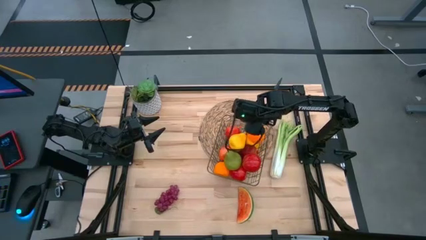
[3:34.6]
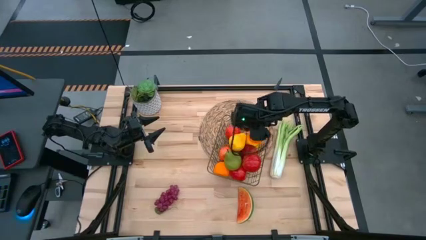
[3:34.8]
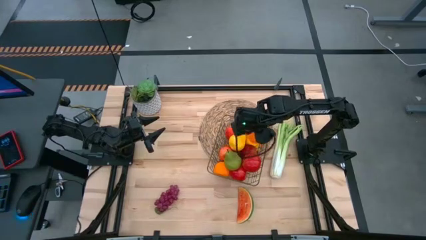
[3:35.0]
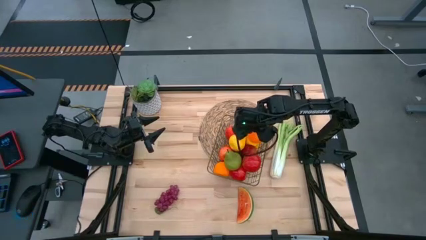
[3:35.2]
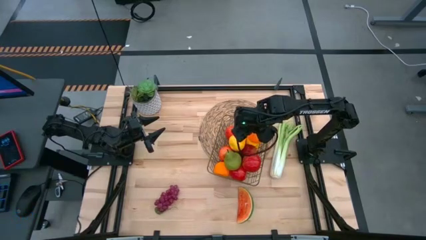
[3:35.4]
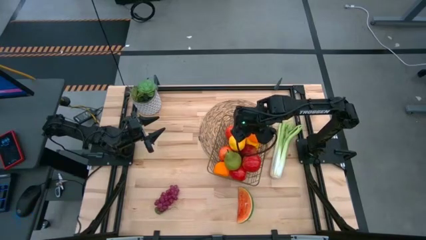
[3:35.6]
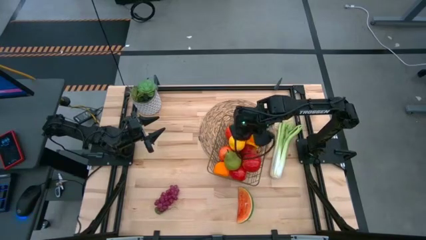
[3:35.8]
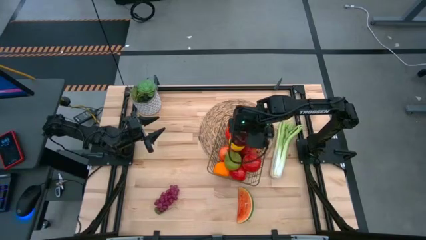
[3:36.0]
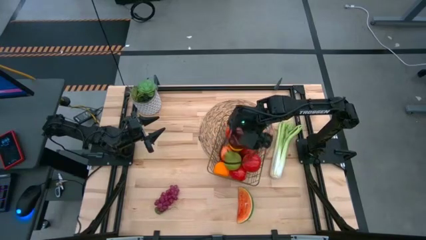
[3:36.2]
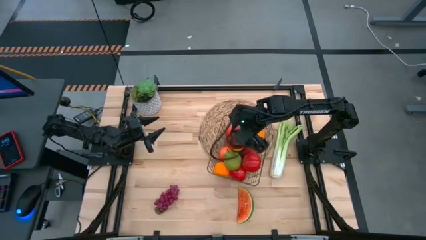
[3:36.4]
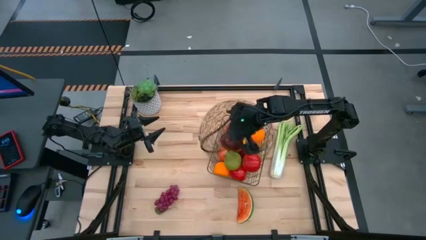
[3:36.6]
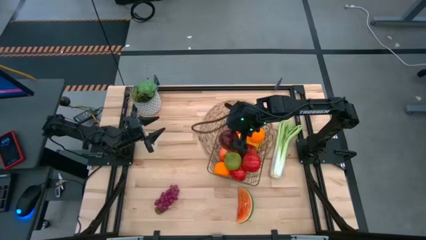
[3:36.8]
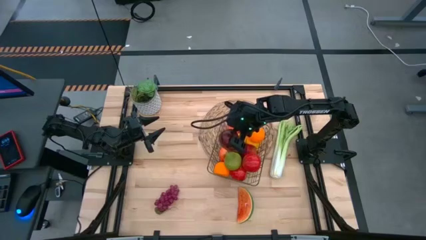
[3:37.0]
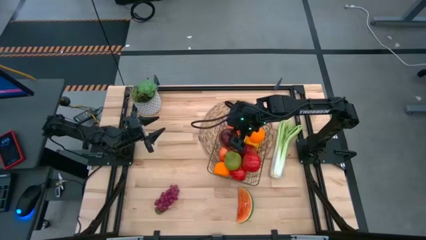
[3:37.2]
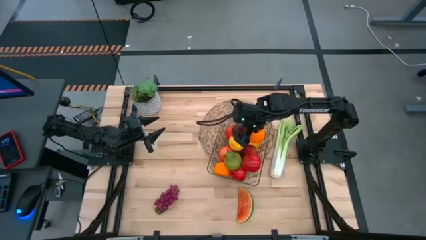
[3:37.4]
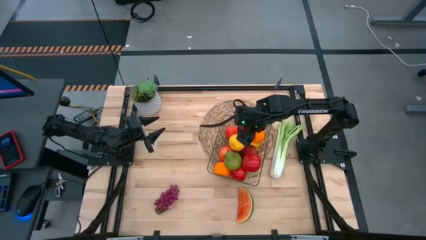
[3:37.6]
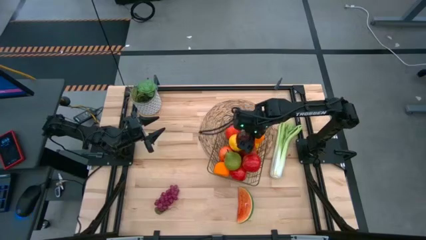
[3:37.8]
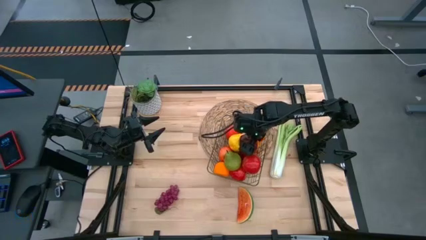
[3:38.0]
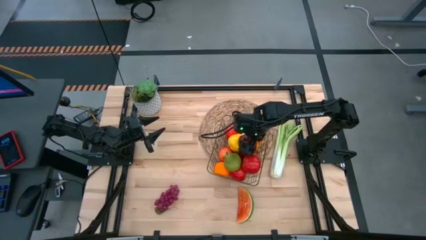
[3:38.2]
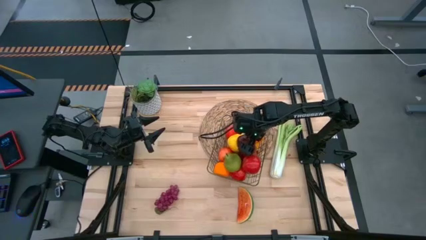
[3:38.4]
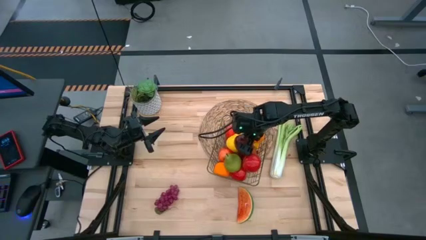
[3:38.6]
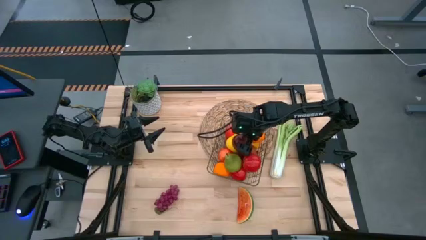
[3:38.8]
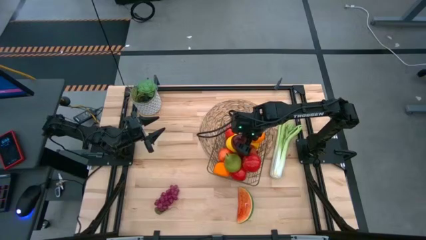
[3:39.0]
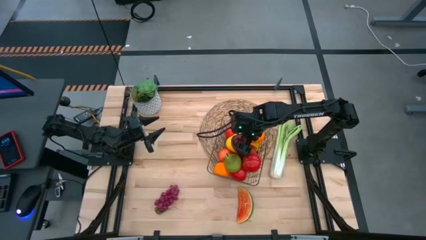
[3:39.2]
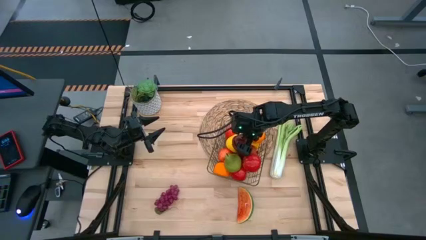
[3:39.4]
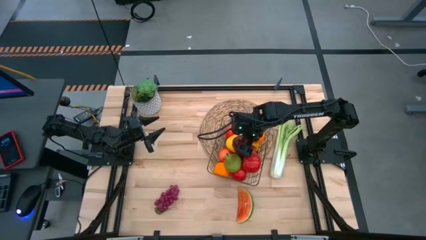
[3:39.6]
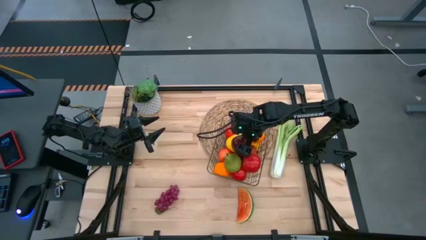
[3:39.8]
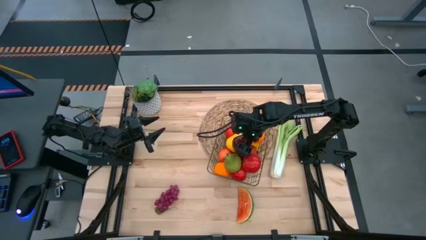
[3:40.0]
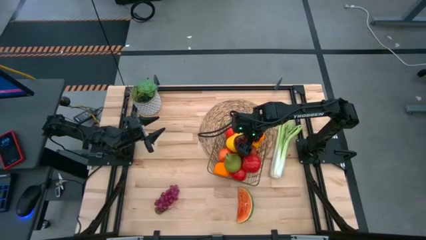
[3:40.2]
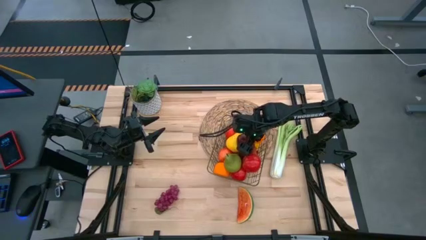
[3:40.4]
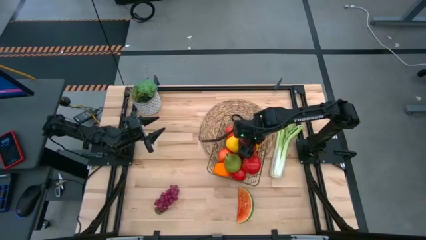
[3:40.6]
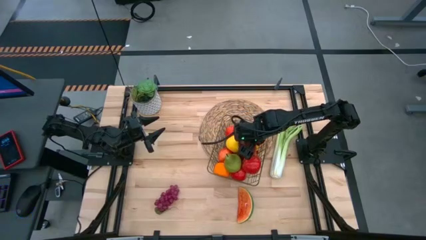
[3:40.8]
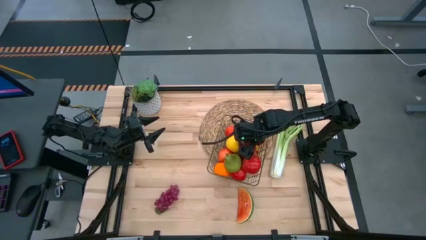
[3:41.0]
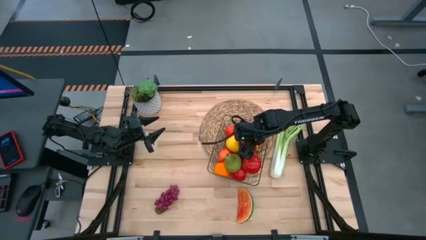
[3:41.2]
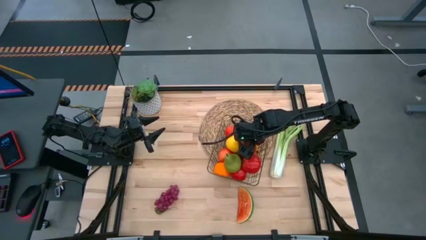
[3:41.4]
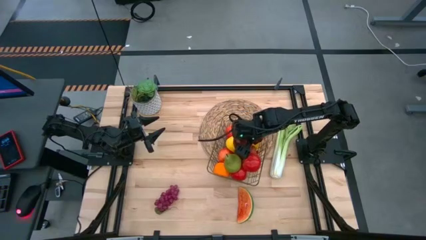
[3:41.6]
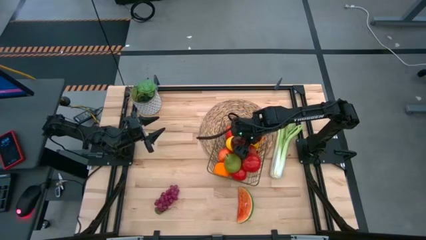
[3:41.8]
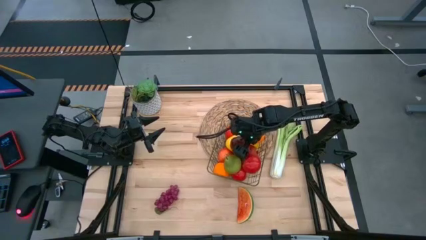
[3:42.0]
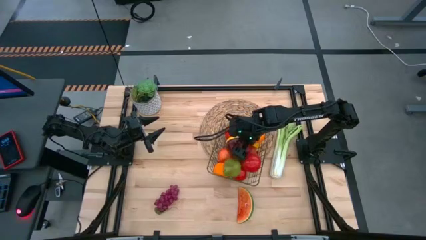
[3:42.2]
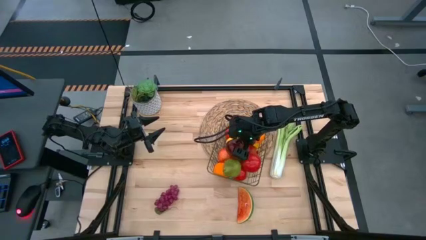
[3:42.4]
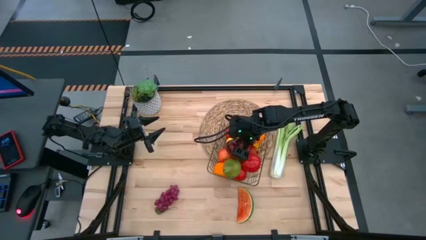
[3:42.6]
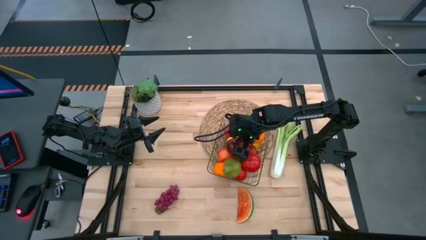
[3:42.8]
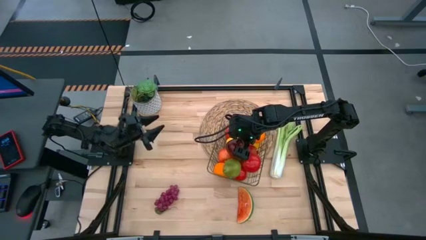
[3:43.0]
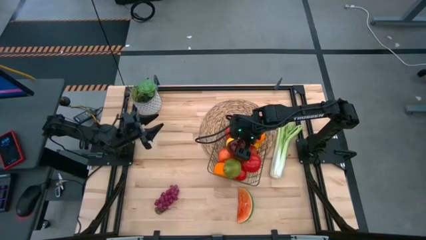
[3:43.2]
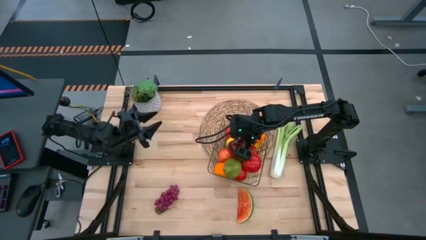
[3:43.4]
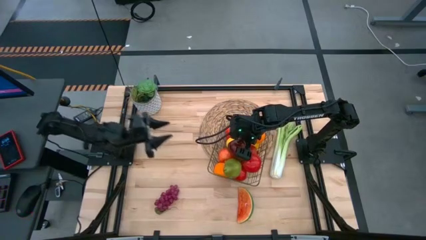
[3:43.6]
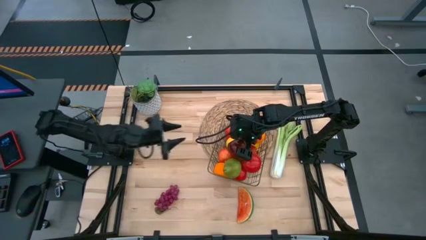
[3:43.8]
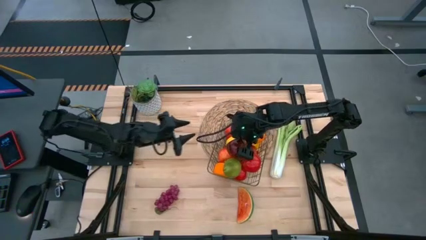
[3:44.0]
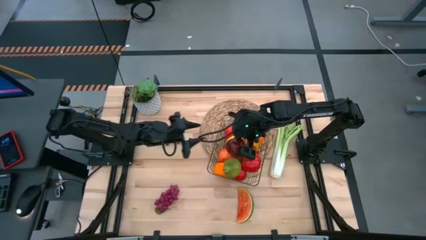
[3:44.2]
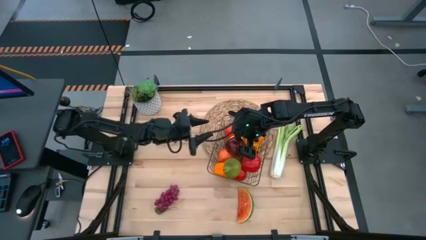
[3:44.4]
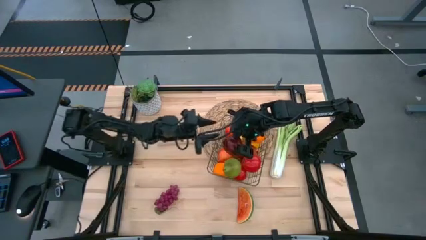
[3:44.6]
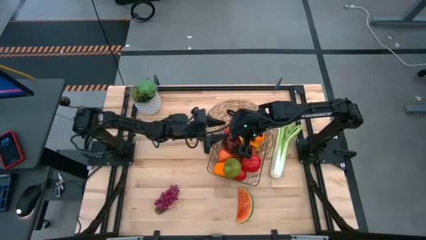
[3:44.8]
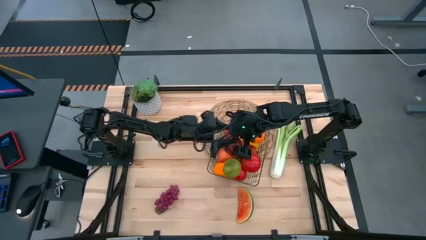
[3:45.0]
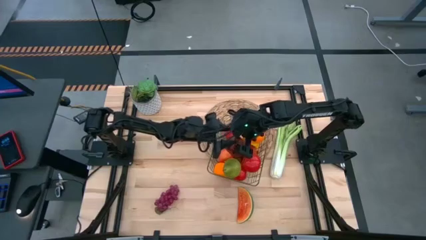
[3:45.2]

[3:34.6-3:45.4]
Task: Build produce basket
Put the dark red apple into the wire basket
